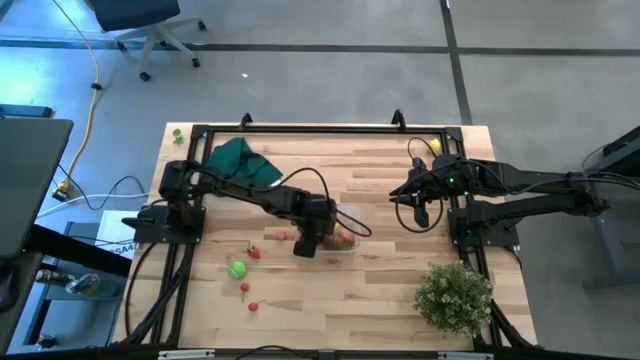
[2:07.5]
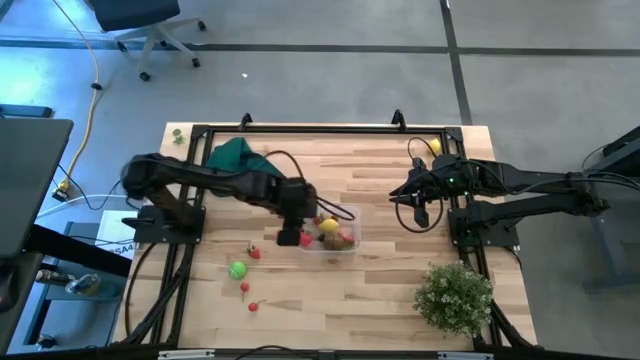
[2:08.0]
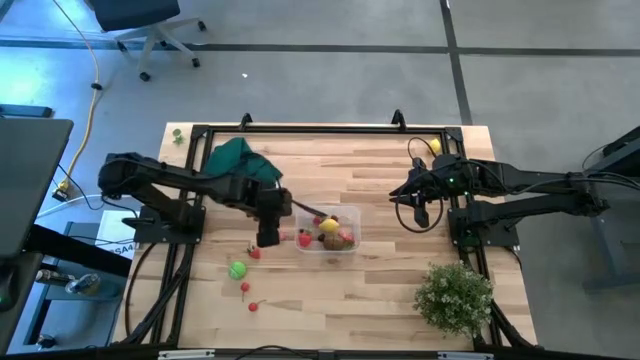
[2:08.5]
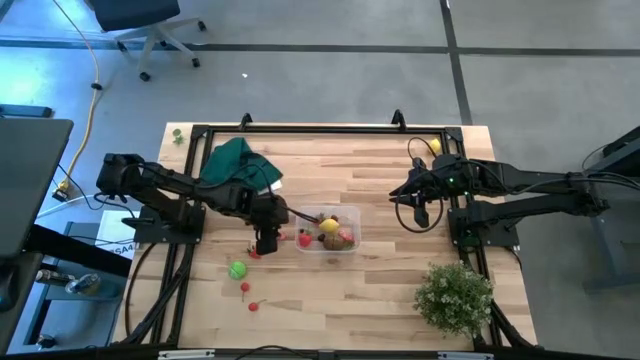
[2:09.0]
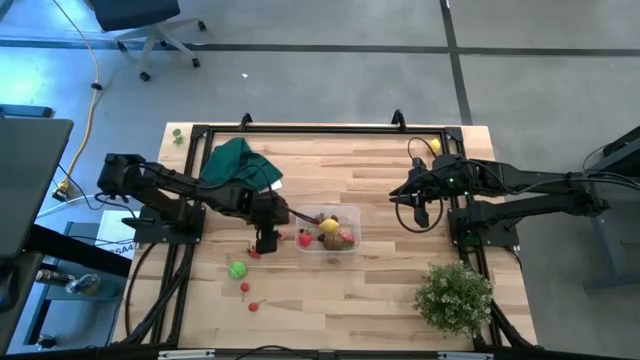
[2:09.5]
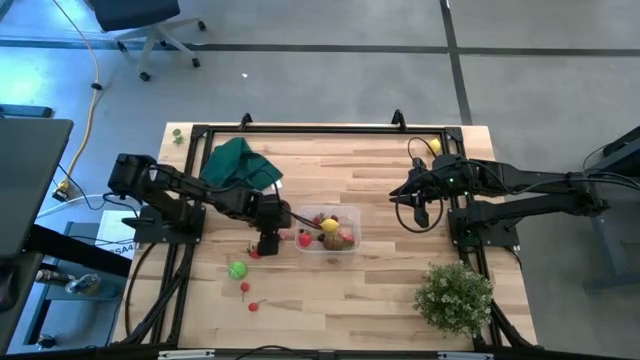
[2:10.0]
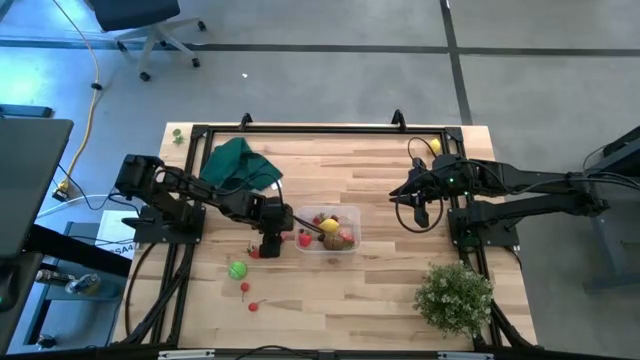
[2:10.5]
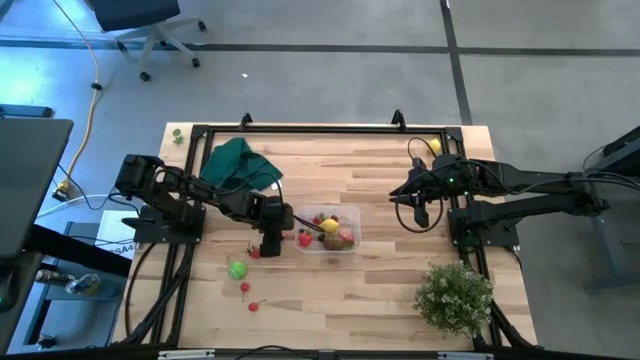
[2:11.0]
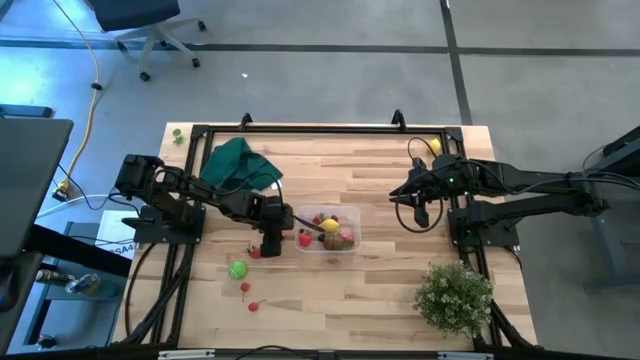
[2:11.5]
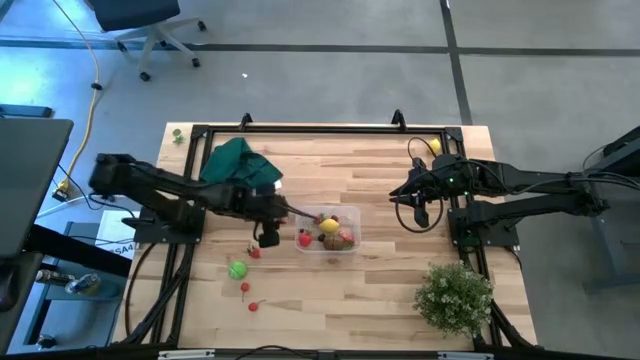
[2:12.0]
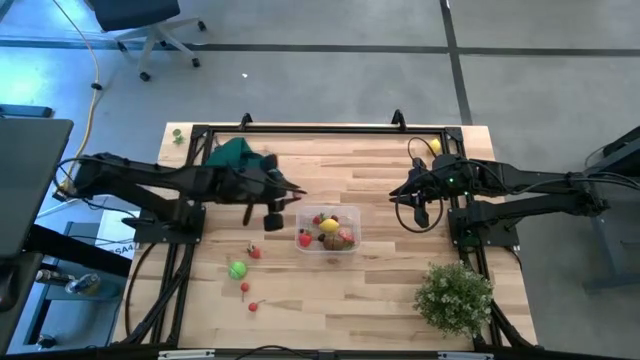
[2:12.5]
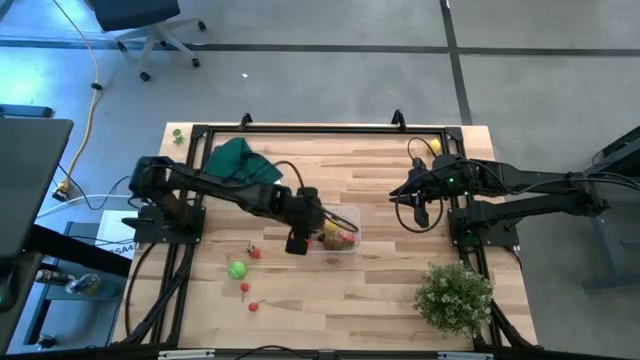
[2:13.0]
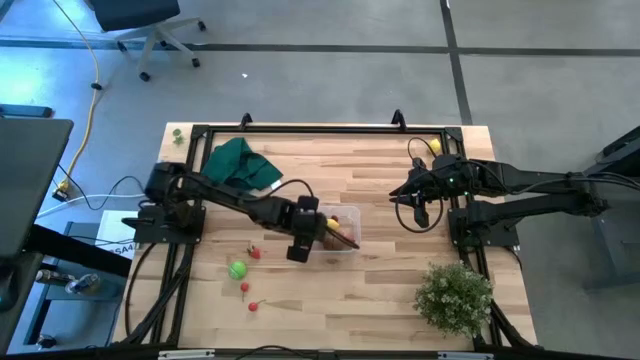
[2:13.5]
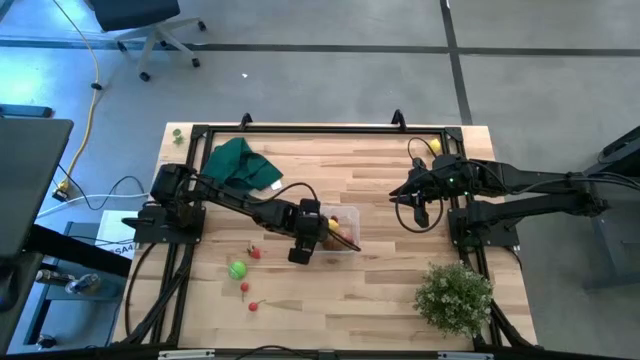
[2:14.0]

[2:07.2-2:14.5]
Task: Pick and placing Produce into tupperware
Put the pink apricot into the transparent bin

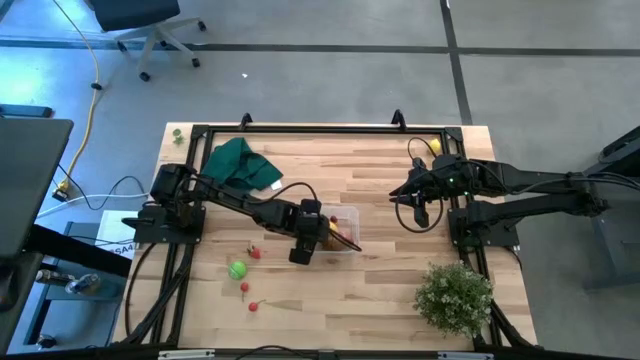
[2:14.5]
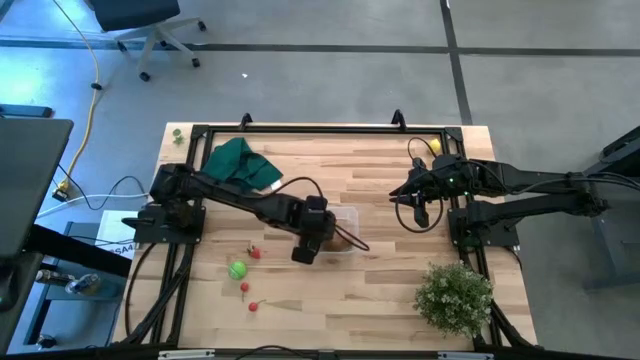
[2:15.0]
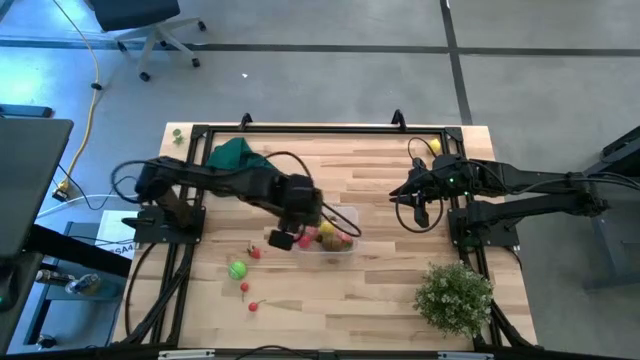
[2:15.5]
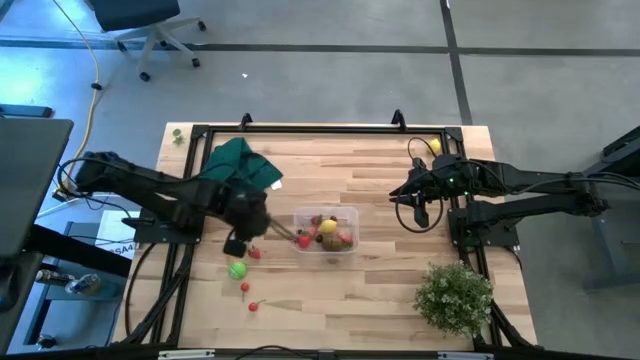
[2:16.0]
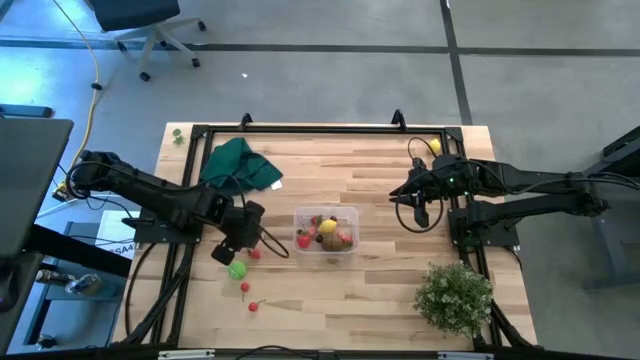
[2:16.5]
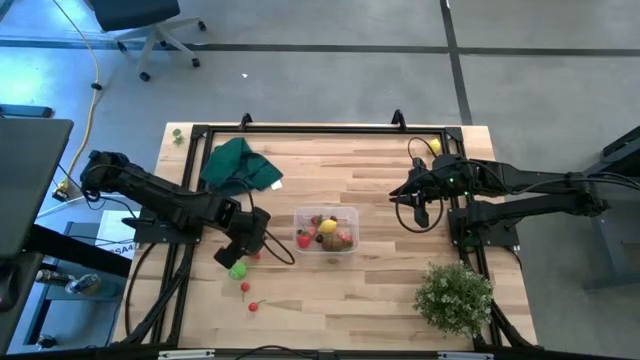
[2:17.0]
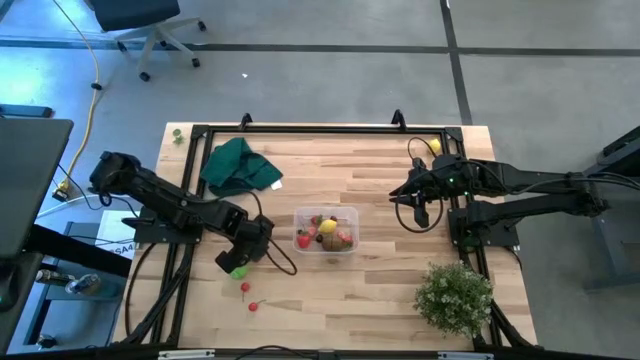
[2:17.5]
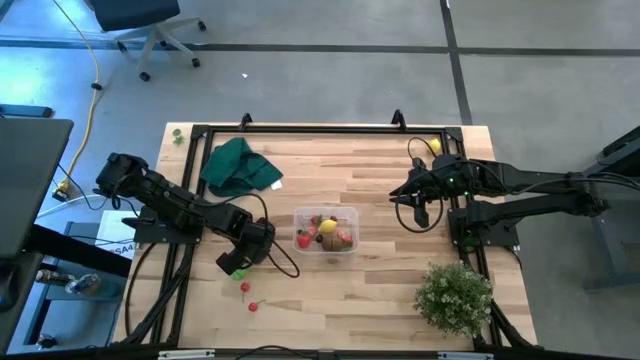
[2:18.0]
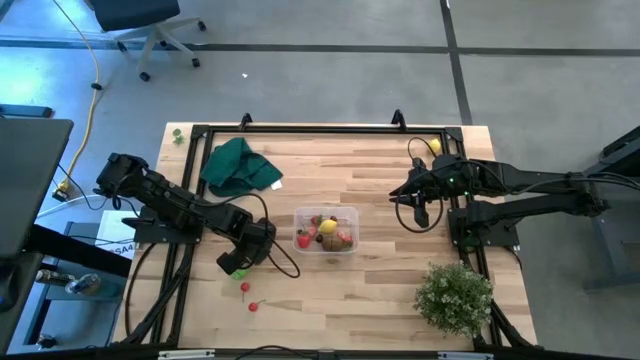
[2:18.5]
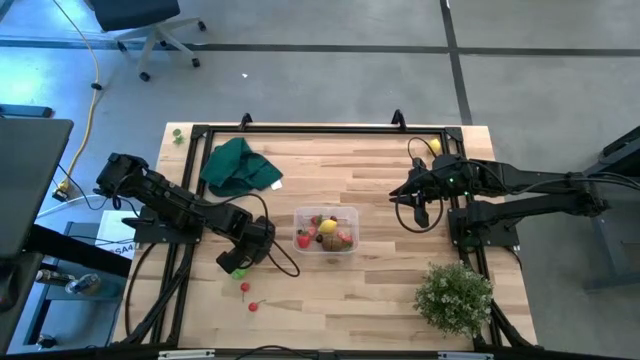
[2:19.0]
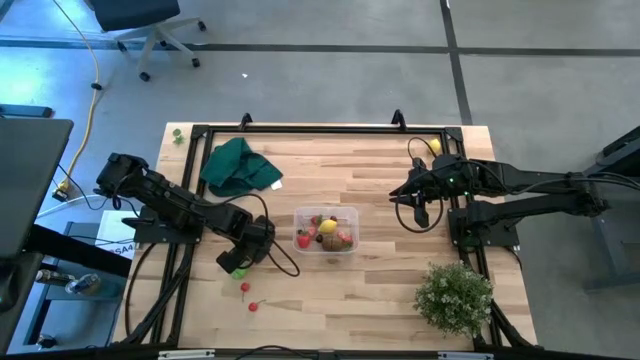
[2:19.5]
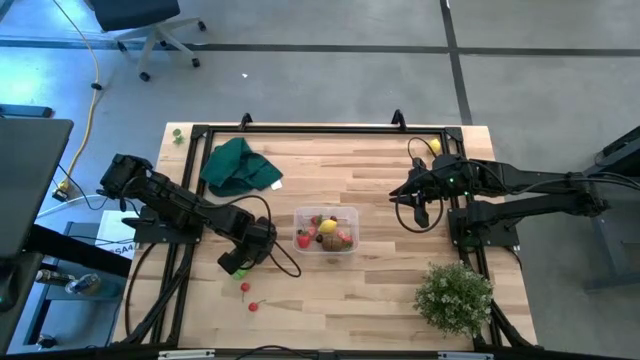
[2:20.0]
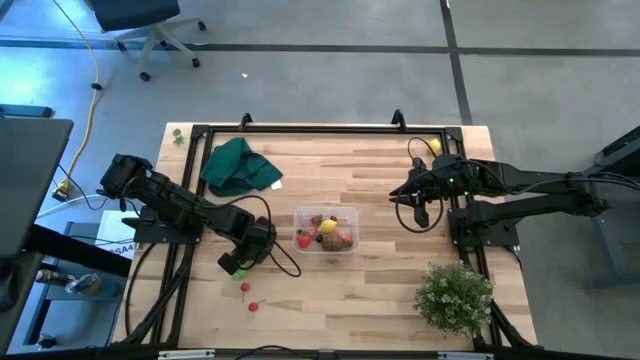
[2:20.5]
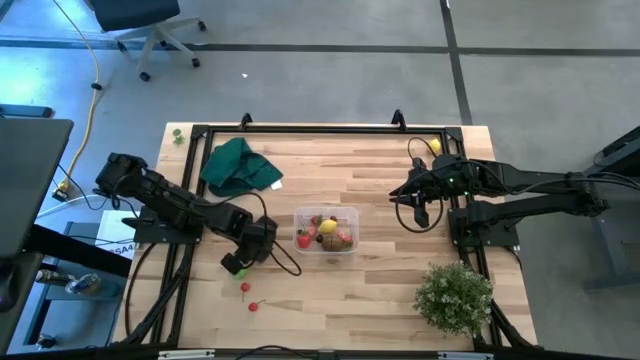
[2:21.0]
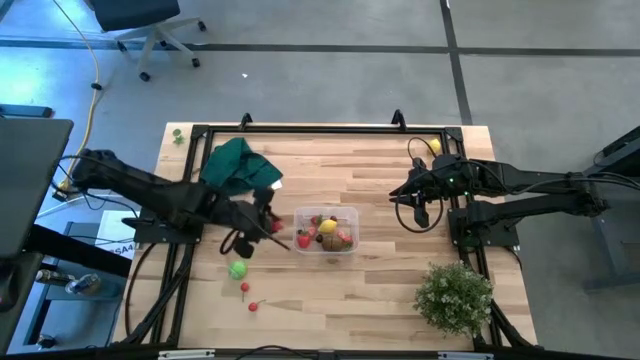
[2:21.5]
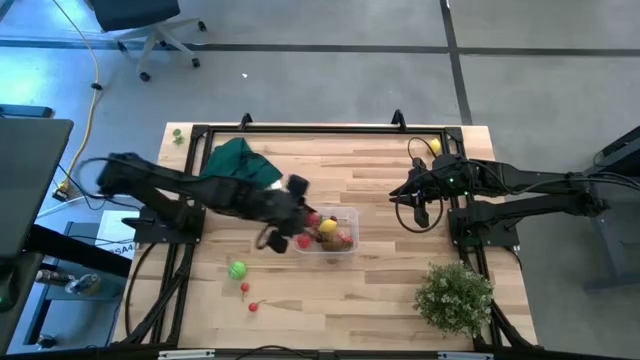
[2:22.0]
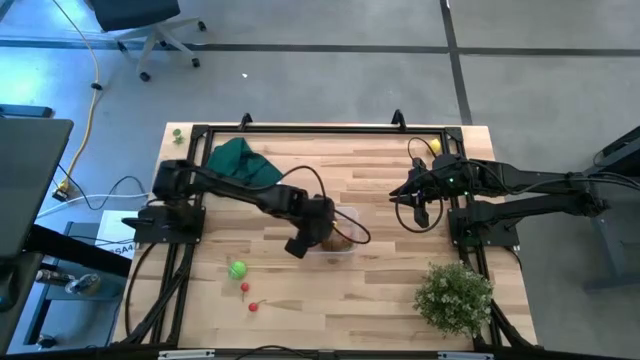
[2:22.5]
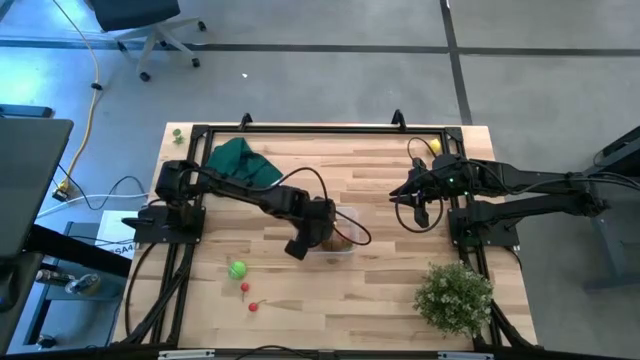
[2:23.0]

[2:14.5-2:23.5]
Put the red strawberry into the transparent bin

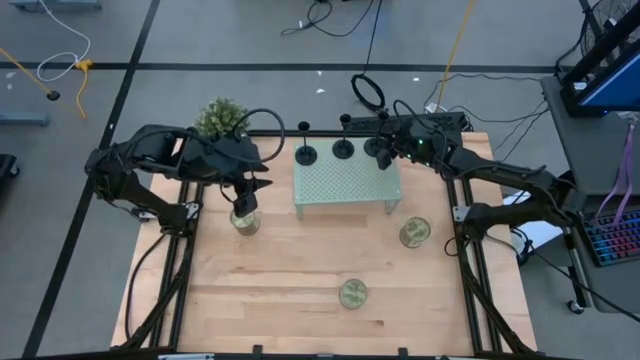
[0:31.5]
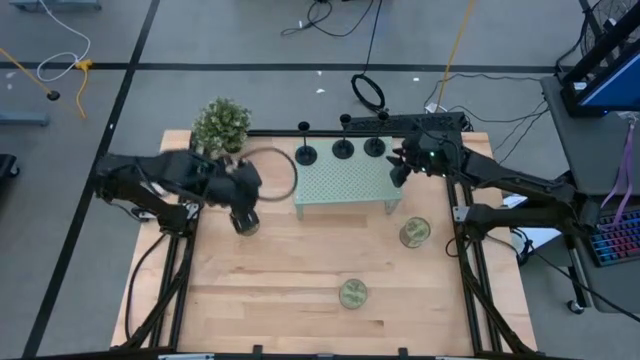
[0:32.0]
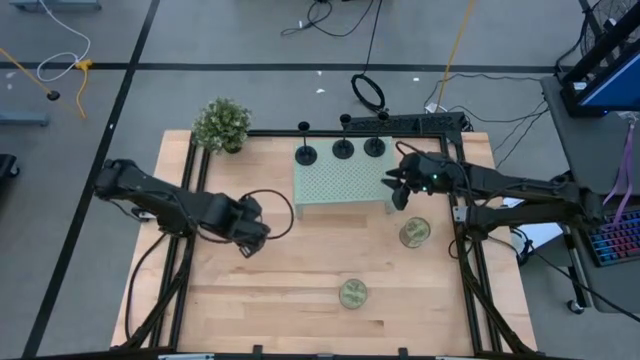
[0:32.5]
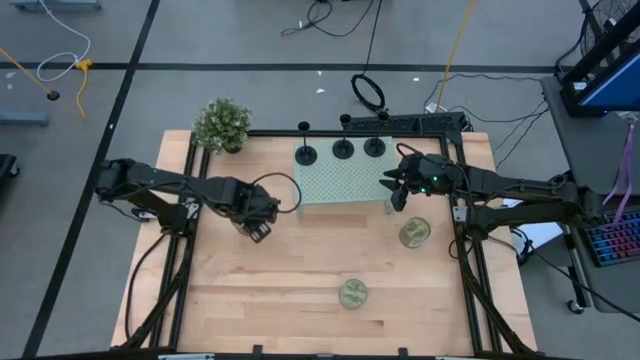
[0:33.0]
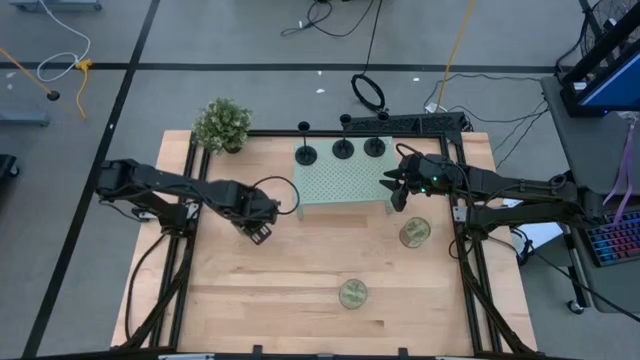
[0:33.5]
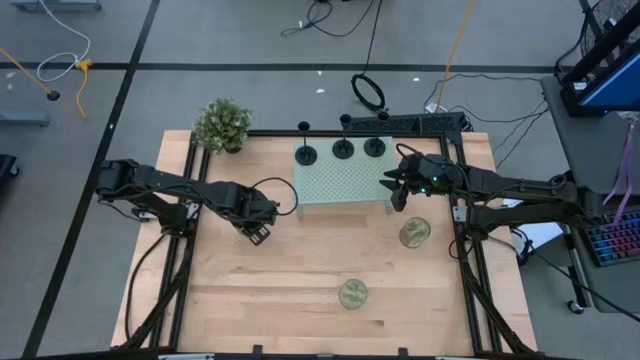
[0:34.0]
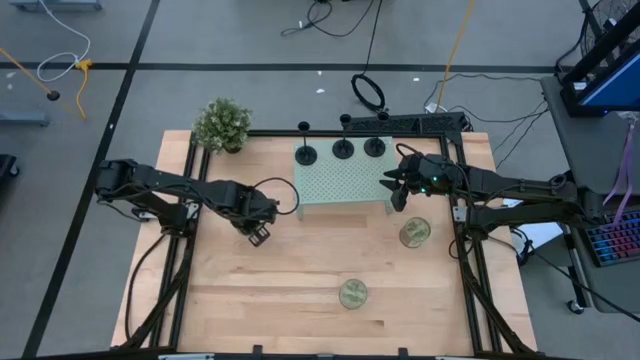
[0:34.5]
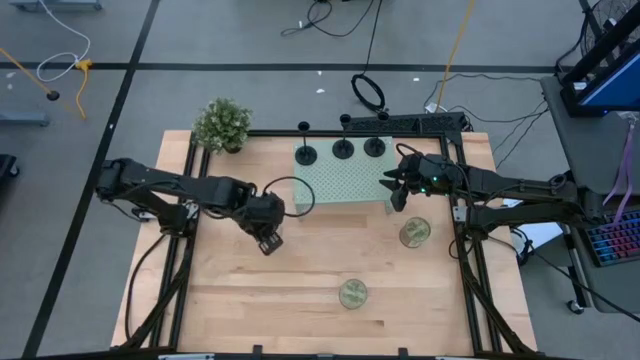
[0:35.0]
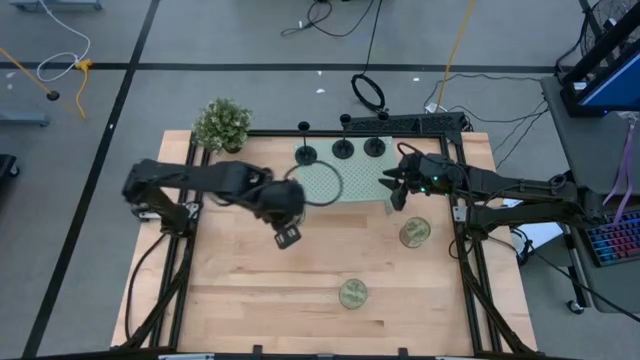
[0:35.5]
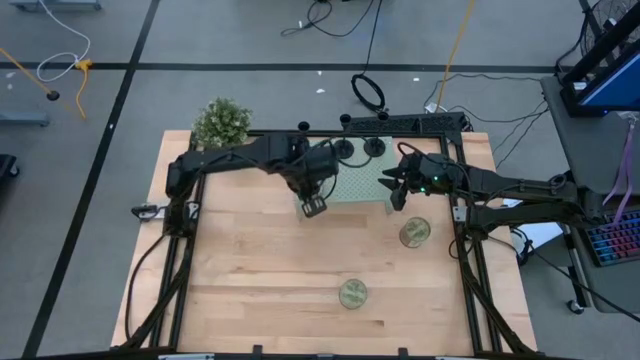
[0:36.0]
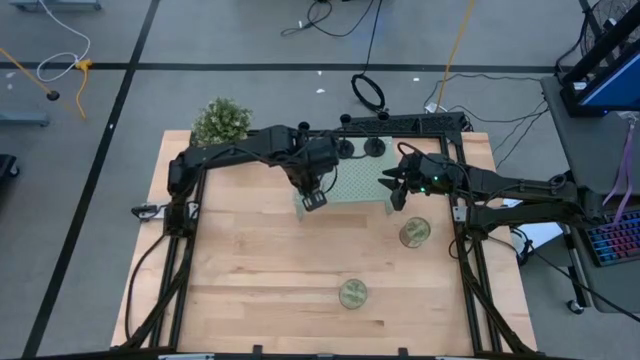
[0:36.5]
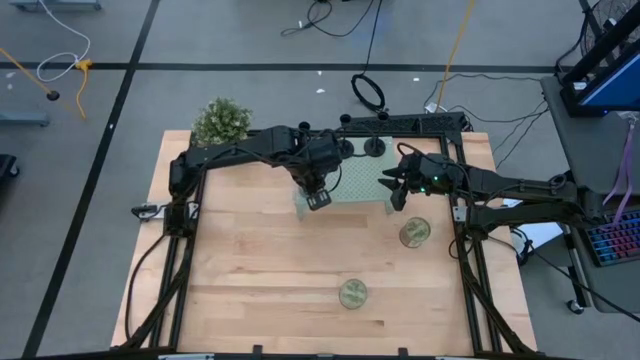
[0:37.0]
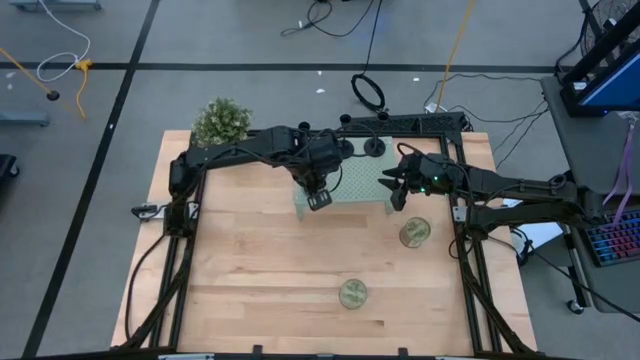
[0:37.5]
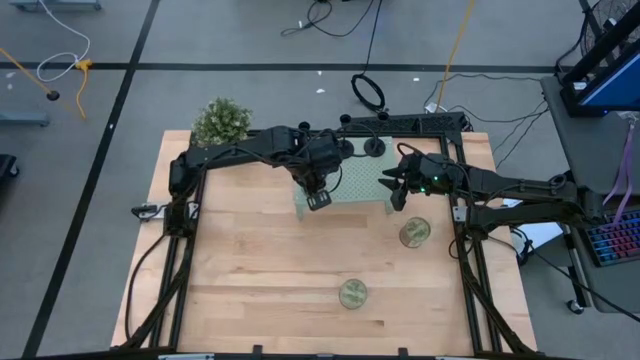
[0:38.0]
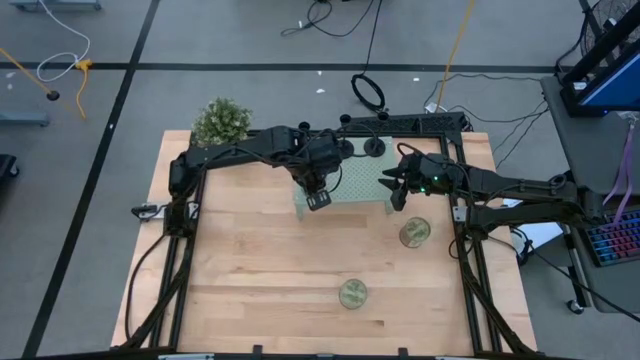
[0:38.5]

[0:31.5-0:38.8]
Task: Pick & Place candle stick holders
Put the top left green scented candle on the shelf
